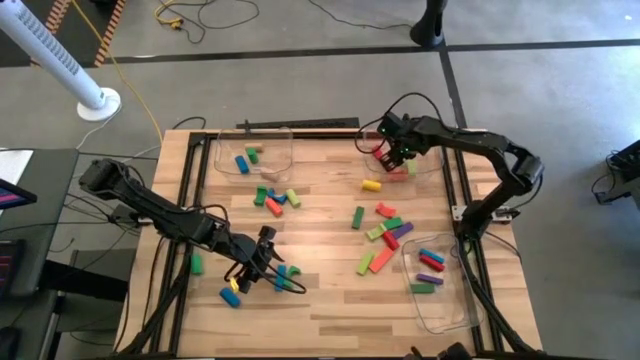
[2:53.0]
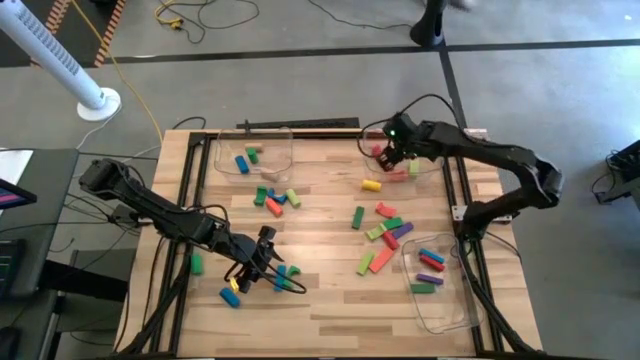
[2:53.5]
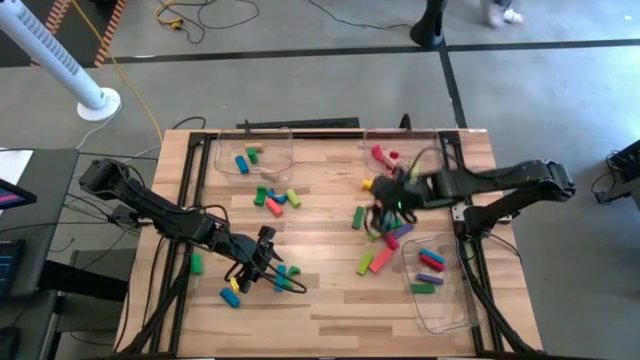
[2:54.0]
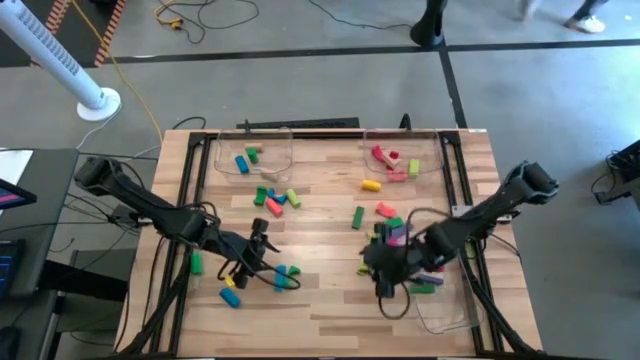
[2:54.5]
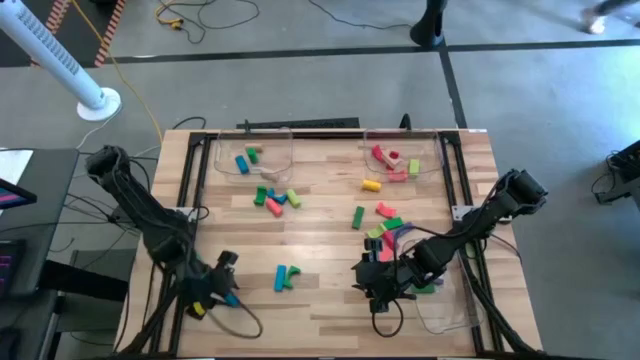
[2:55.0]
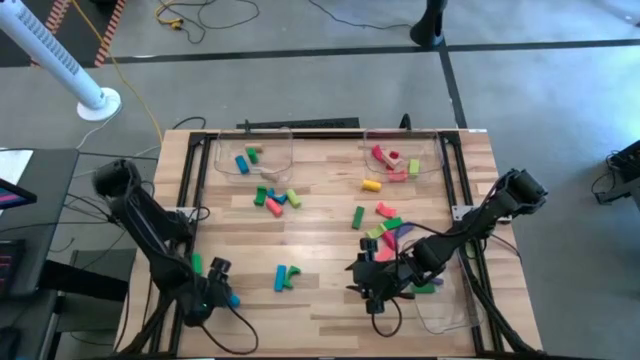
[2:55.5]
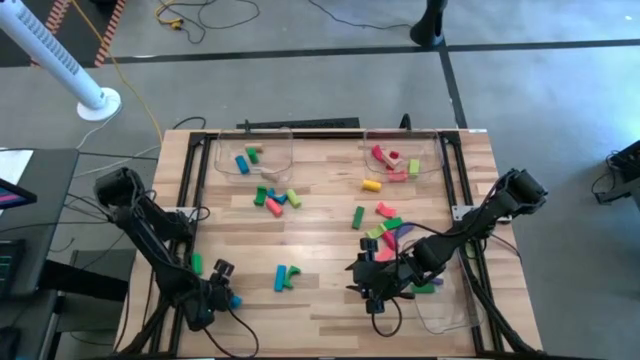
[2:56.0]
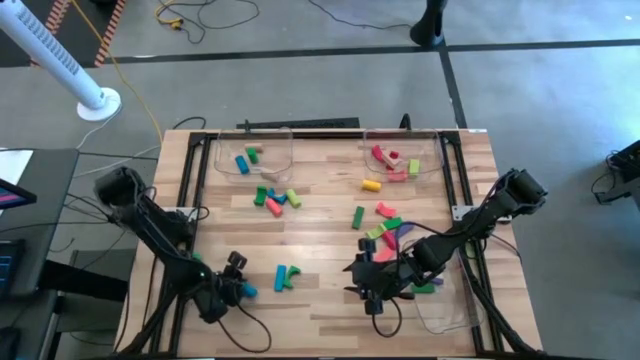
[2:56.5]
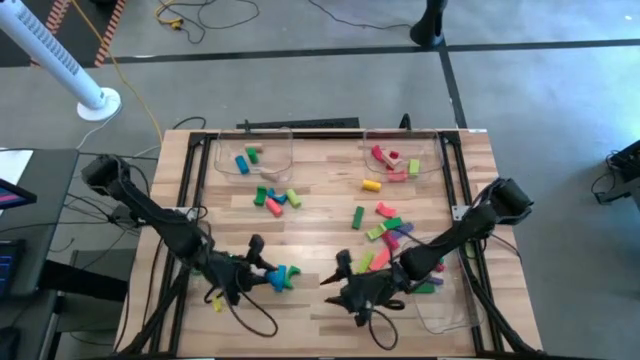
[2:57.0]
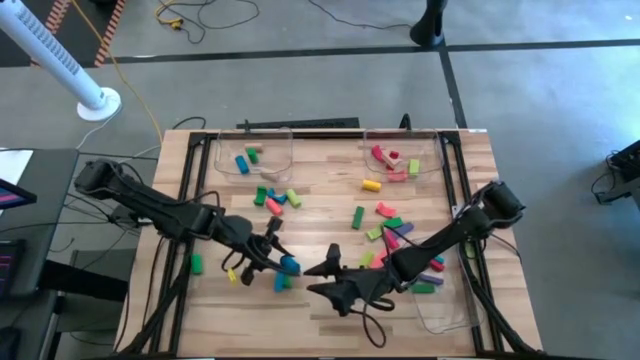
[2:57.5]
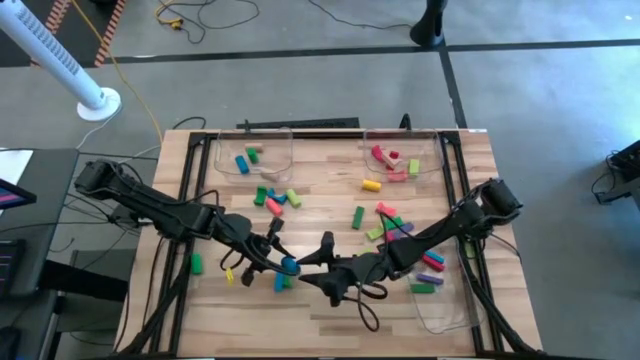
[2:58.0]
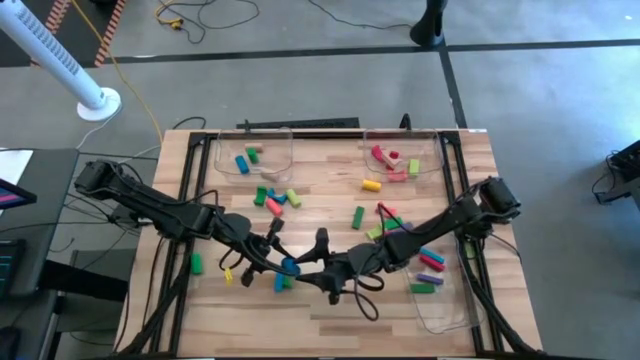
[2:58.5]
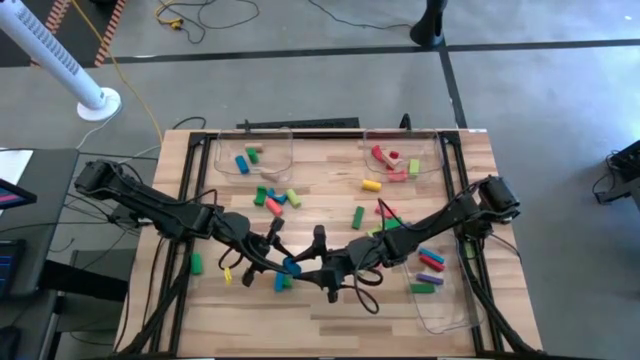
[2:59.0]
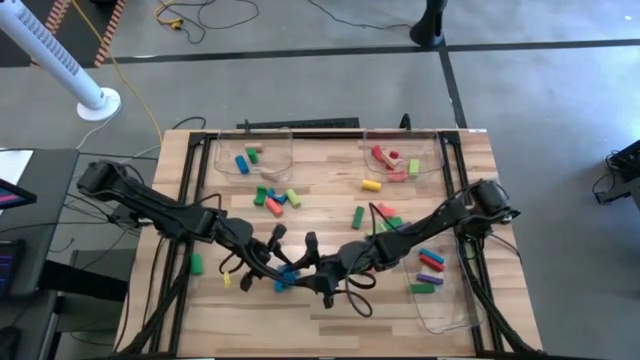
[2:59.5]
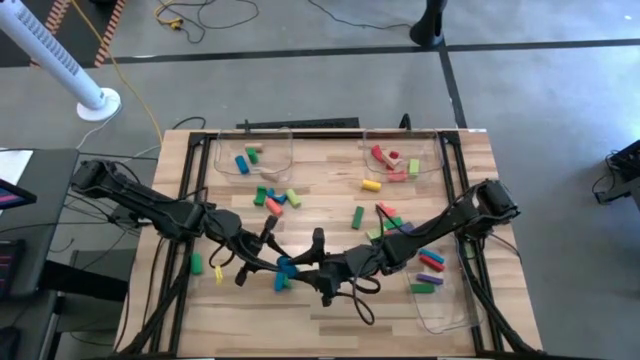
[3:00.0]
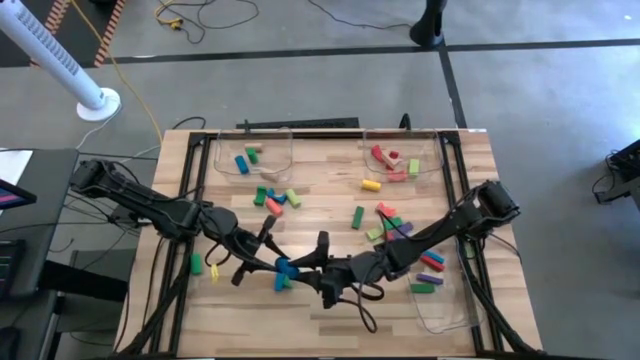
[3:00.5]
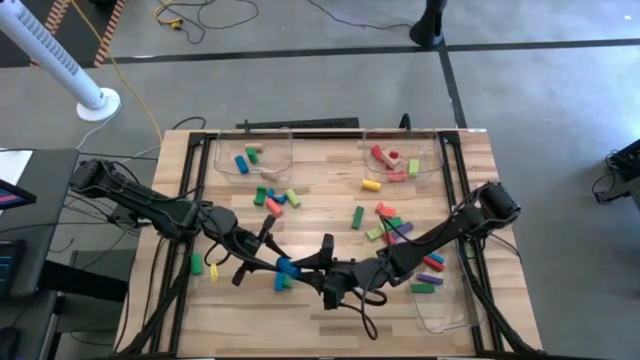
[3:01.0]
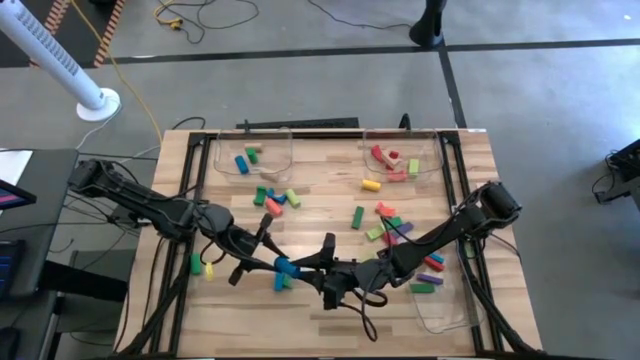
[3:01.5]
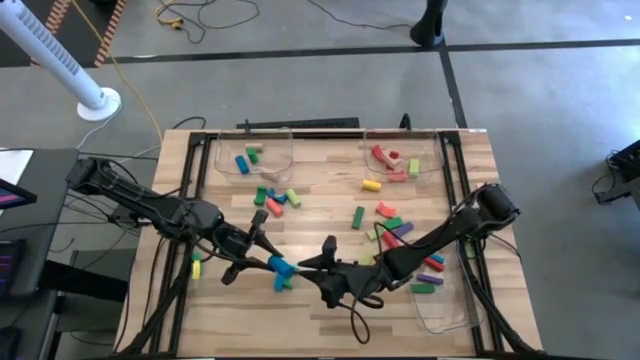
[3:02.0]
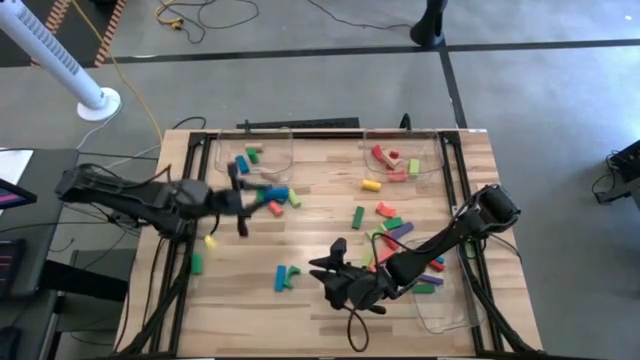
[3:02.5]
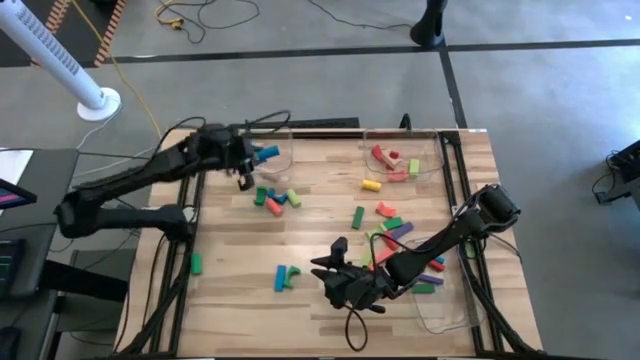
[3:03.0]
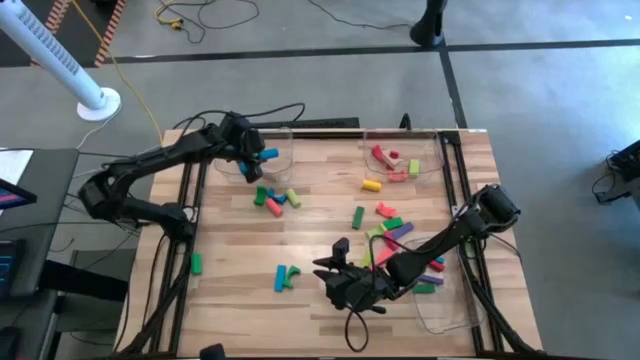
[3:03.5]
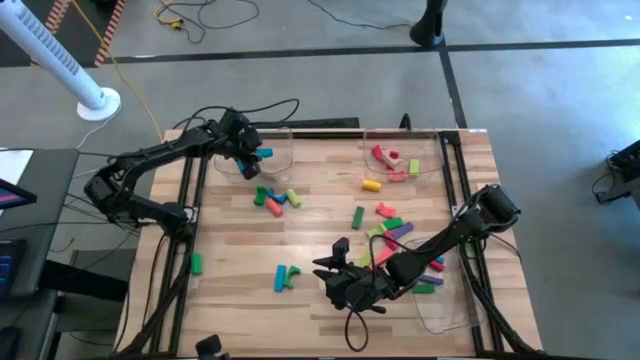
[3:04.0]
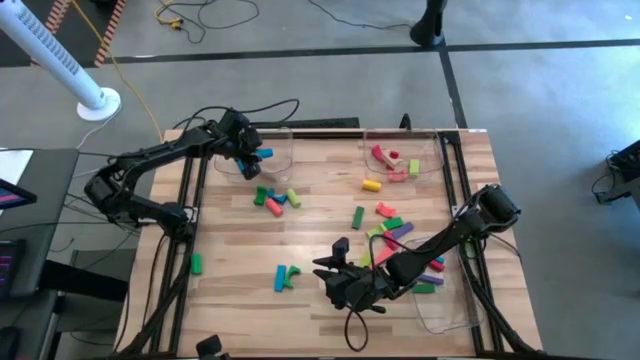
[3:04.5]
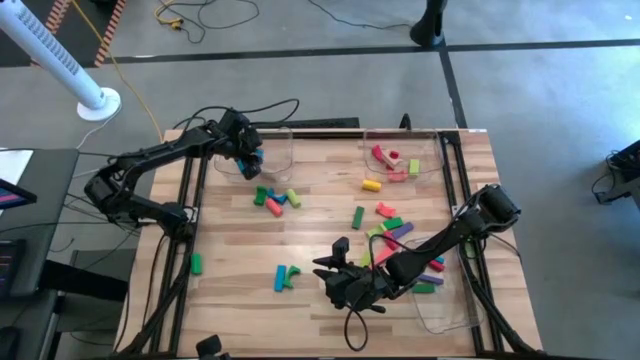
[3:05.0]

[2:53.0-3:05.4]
Task: Sort blocks by size
Put the blue cylinder block into the top left transparent bin

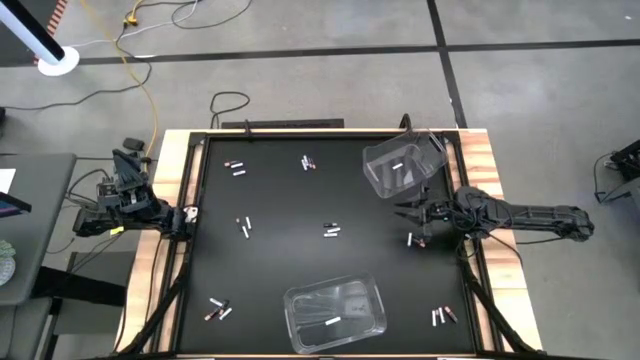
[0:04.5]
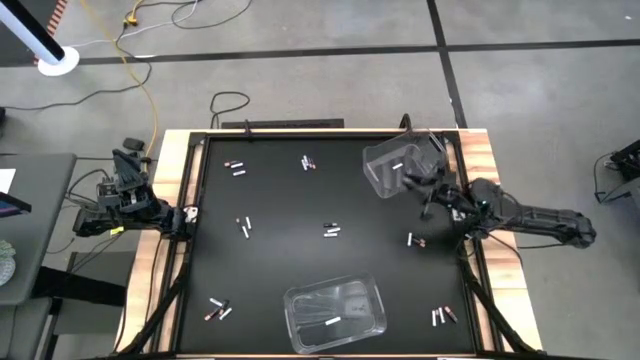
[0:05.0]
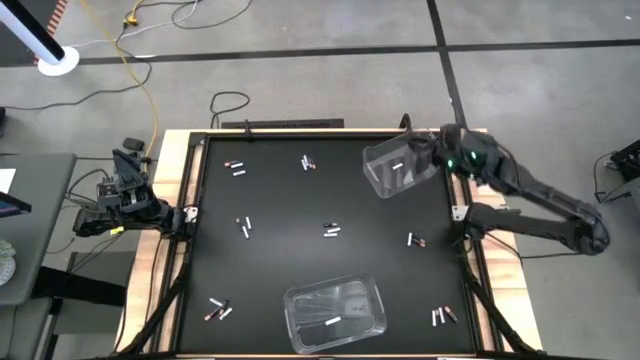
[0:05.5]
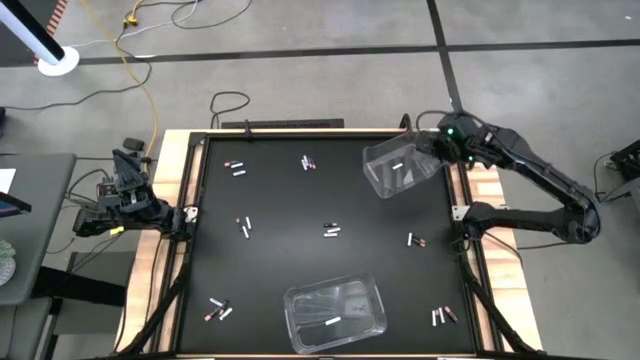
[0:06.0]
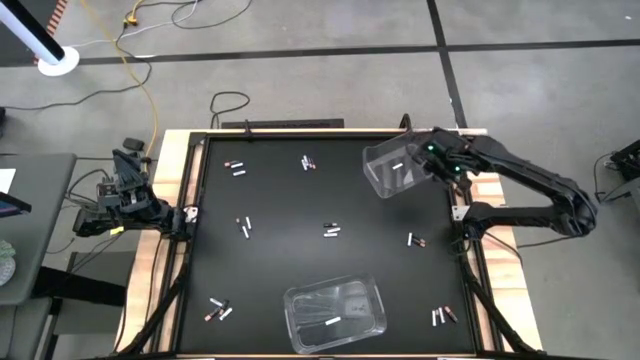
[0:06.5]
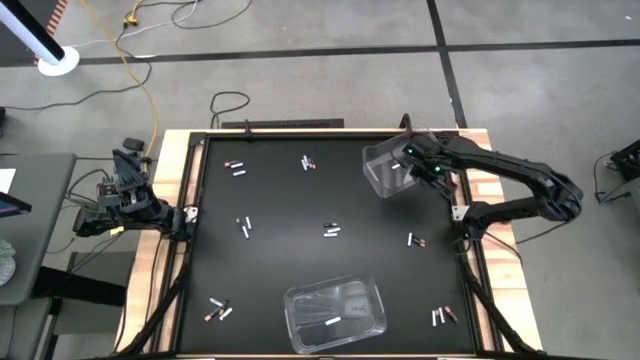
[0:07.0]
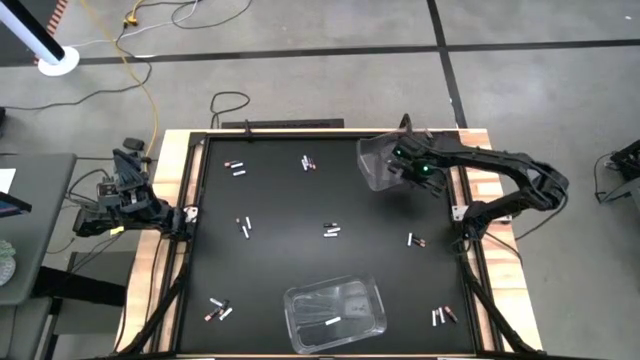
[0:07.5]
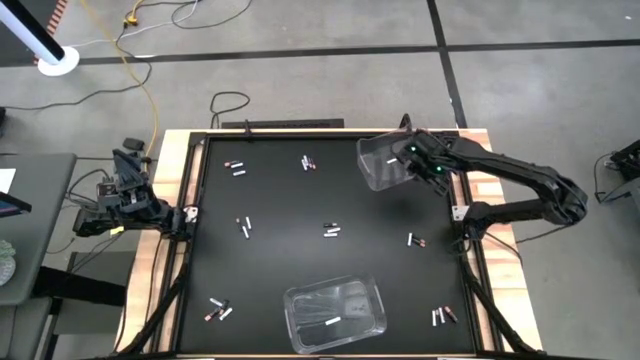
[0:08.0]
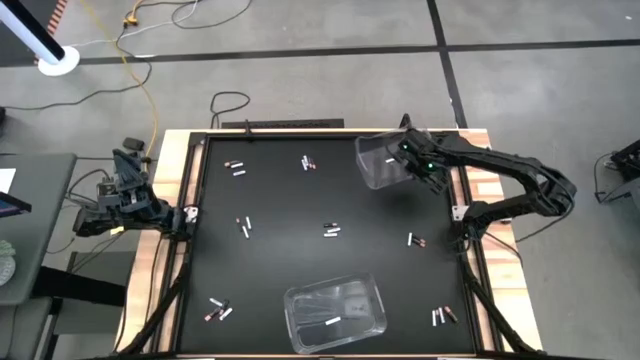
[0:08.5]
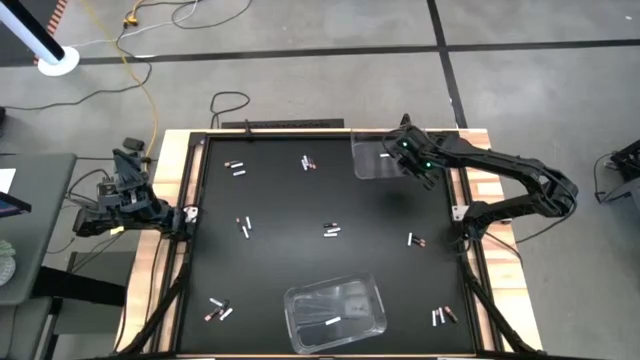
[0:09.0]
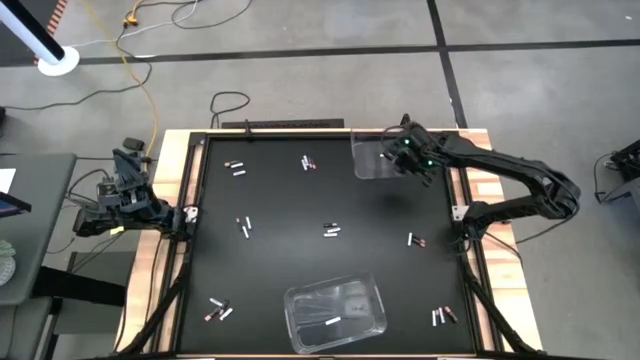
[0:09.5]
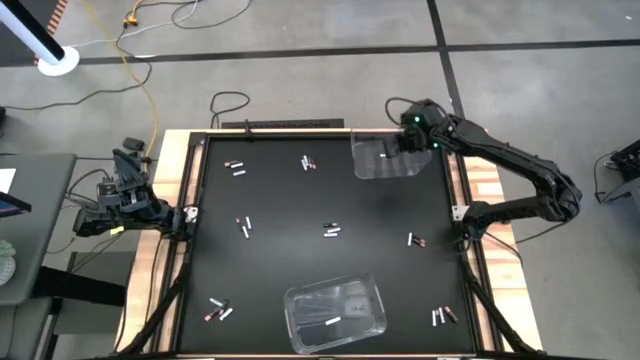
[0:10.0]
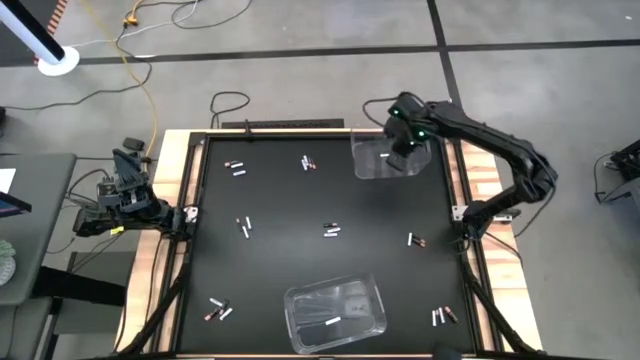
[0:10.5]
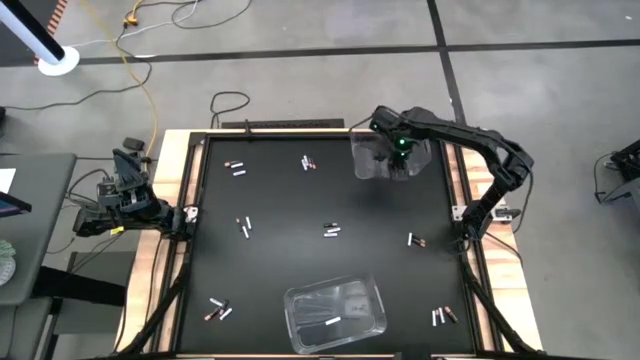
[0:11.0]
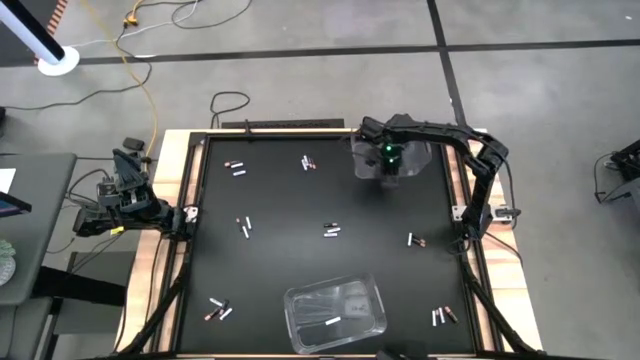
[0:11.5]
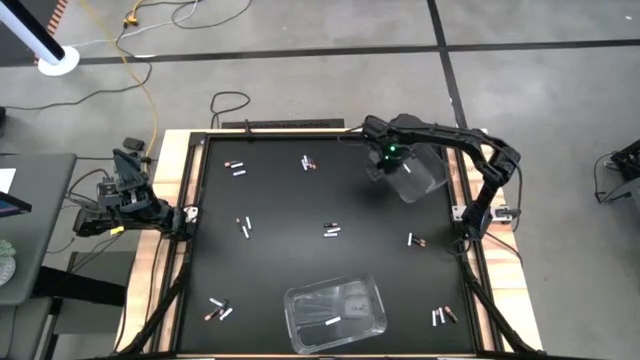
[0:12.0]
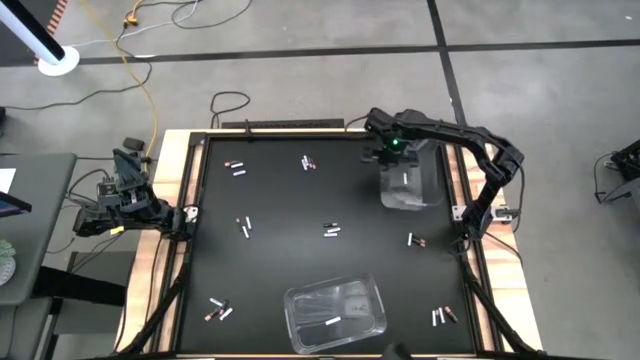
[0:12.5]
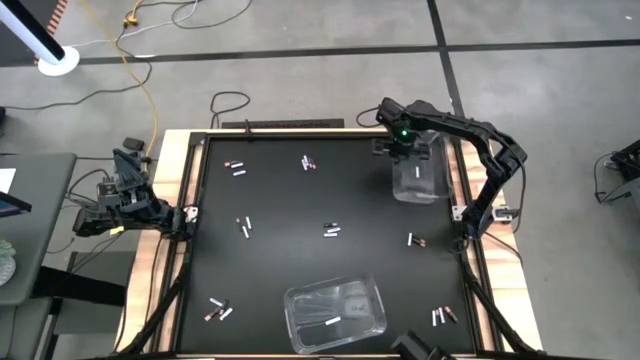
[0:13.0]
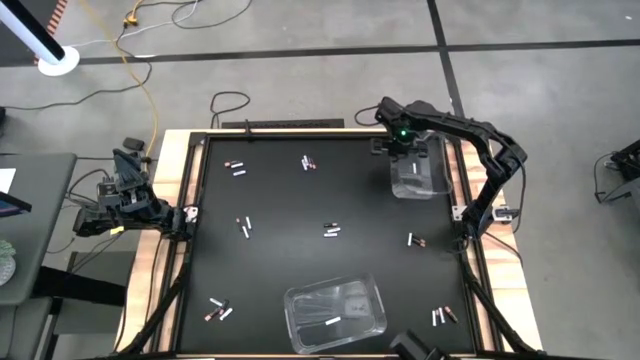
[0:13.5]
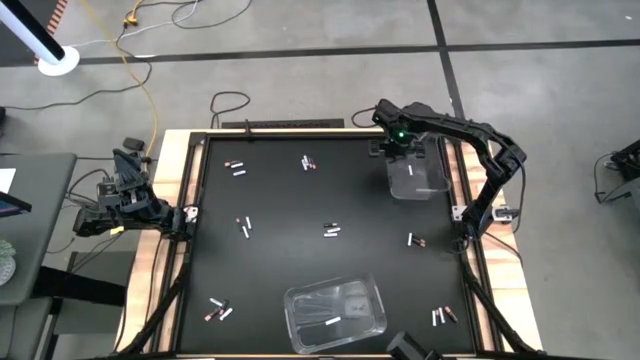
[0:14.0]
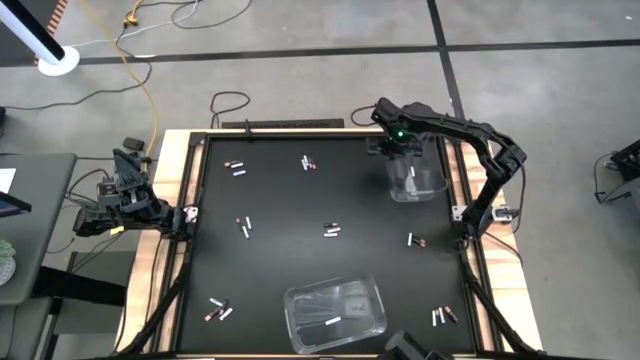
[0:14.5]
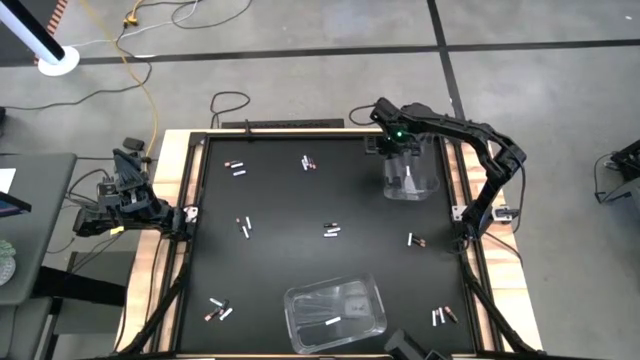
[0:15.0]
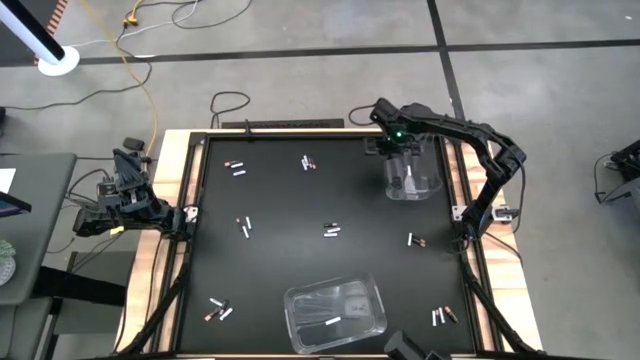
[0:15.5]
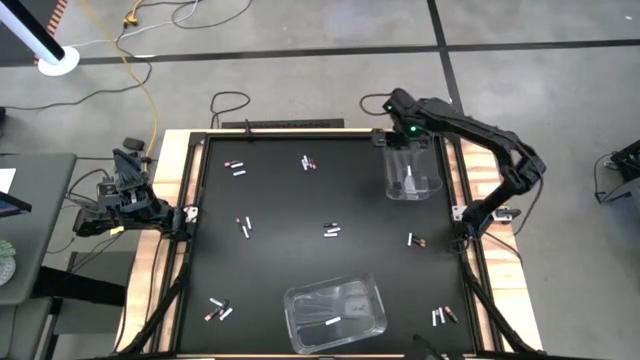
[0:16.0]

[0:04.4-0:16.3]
Task: Sort batteries
Adjust the top transparent bin
